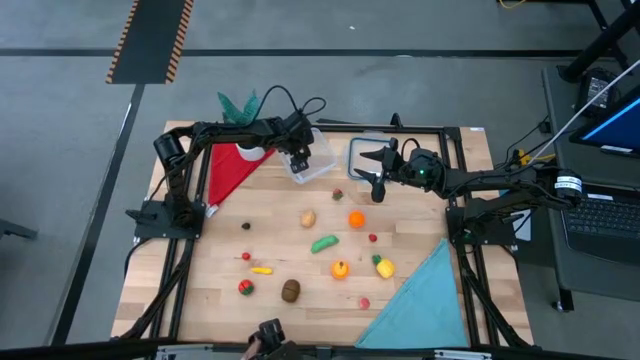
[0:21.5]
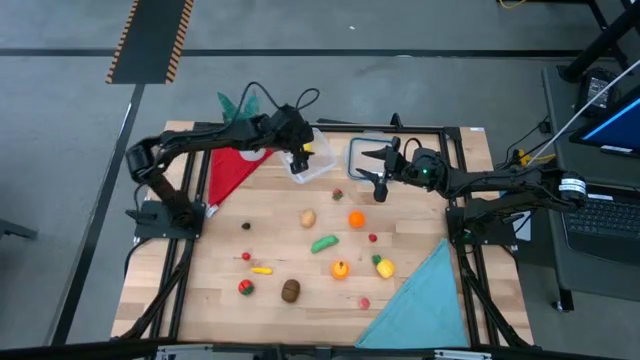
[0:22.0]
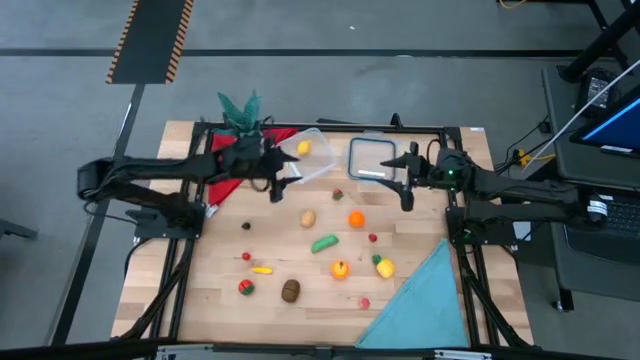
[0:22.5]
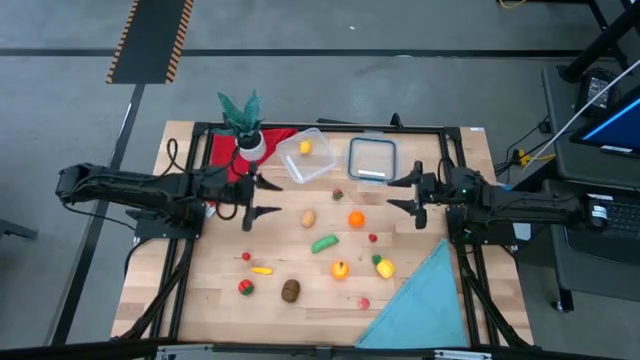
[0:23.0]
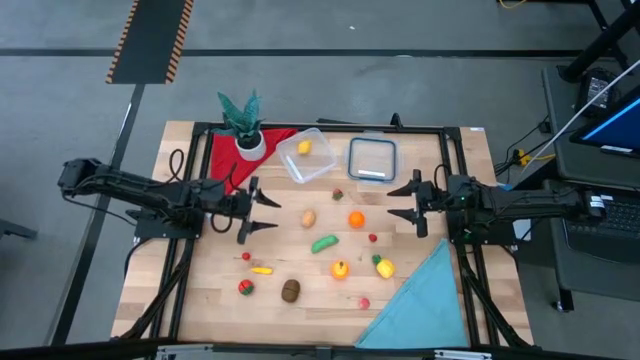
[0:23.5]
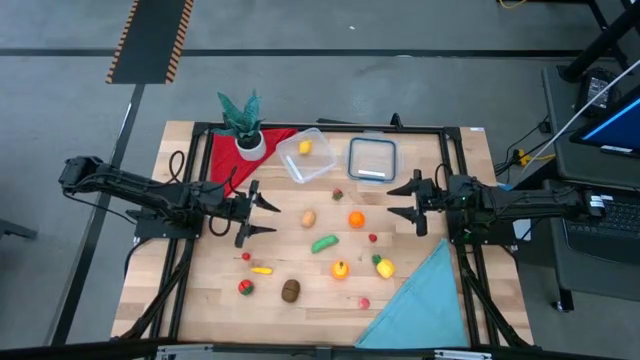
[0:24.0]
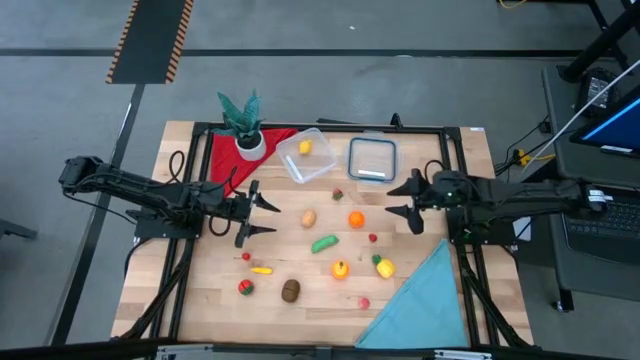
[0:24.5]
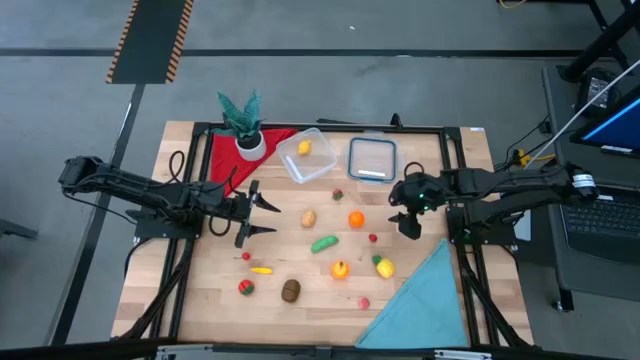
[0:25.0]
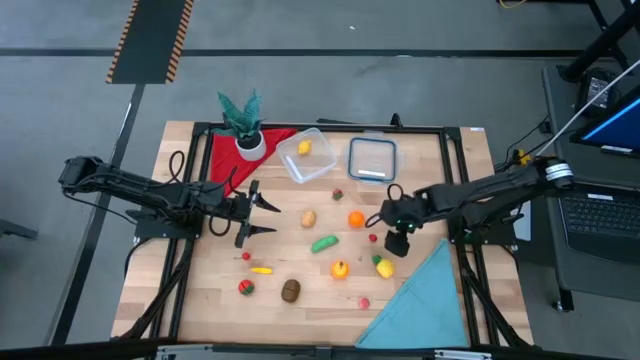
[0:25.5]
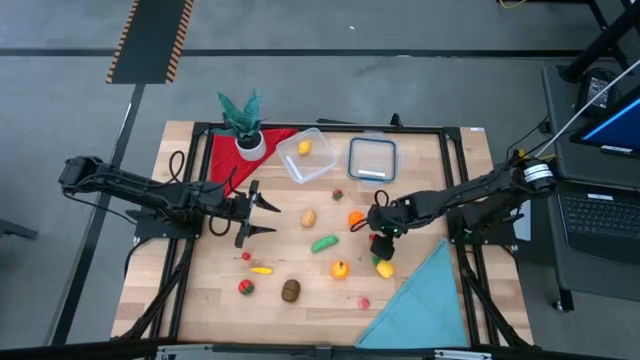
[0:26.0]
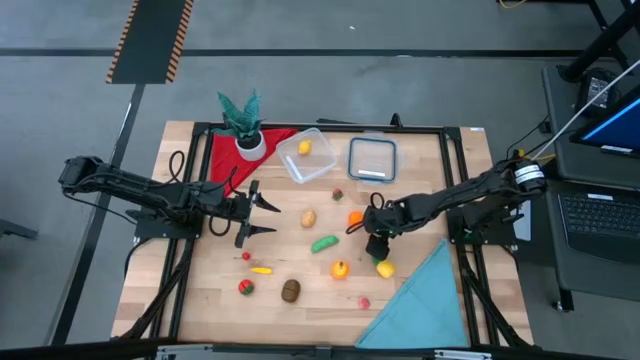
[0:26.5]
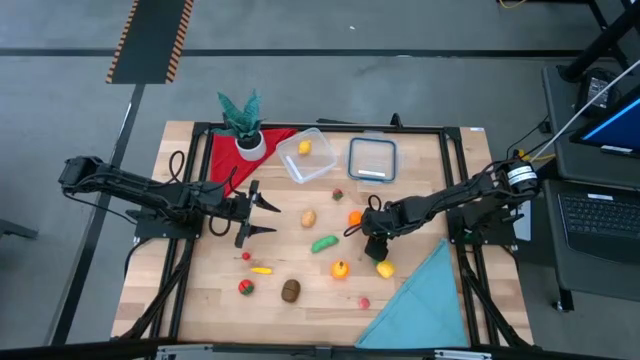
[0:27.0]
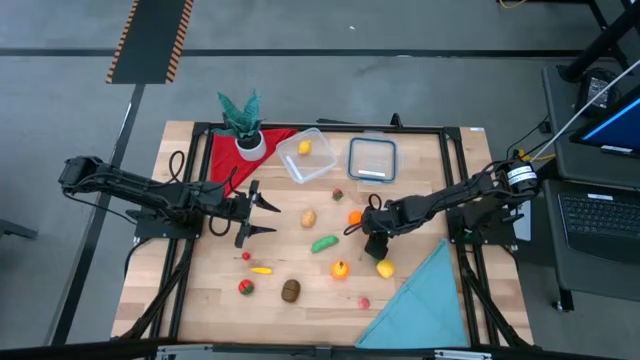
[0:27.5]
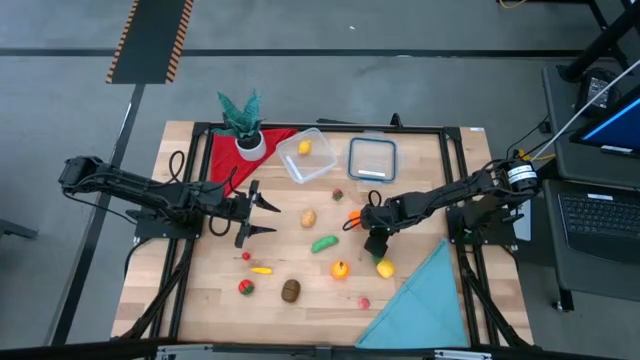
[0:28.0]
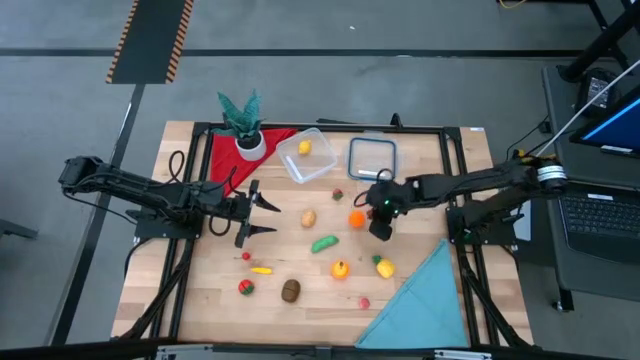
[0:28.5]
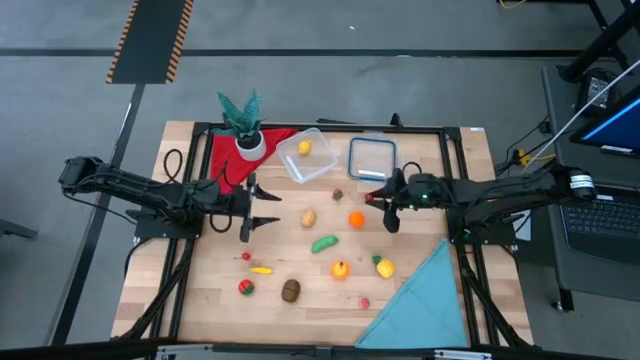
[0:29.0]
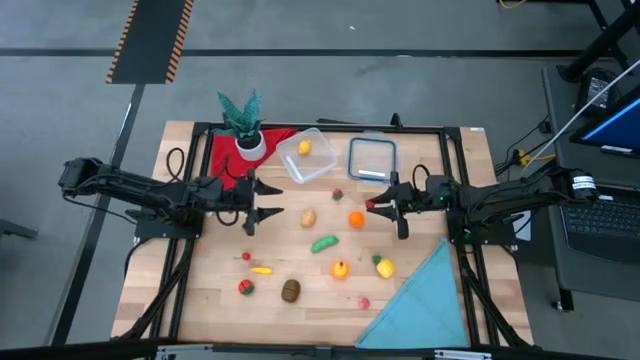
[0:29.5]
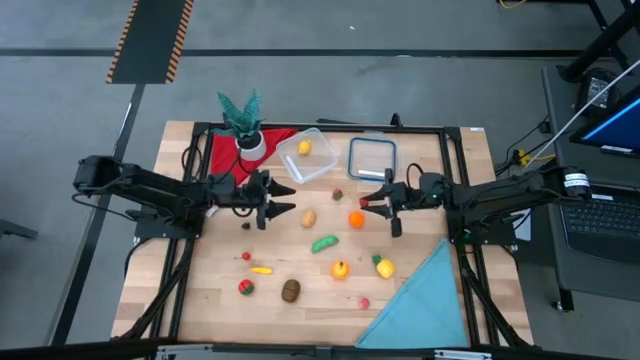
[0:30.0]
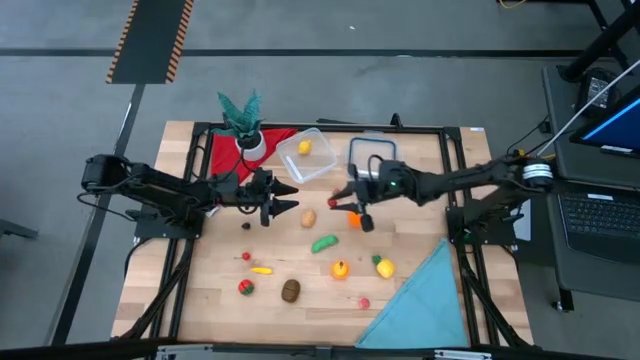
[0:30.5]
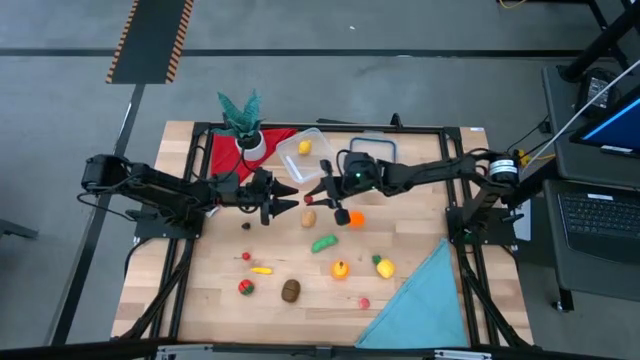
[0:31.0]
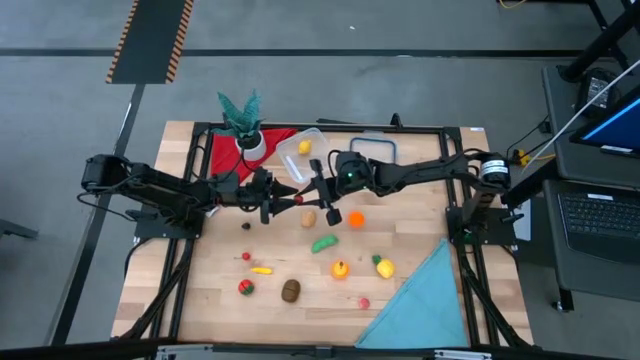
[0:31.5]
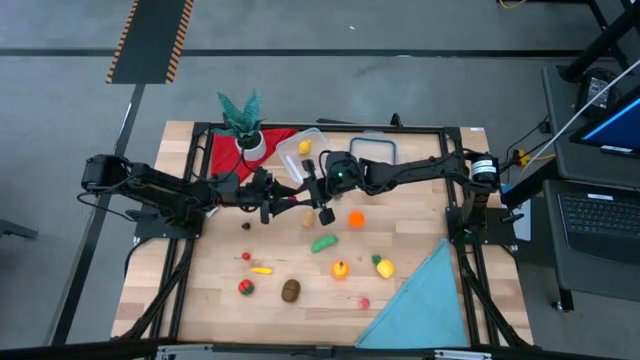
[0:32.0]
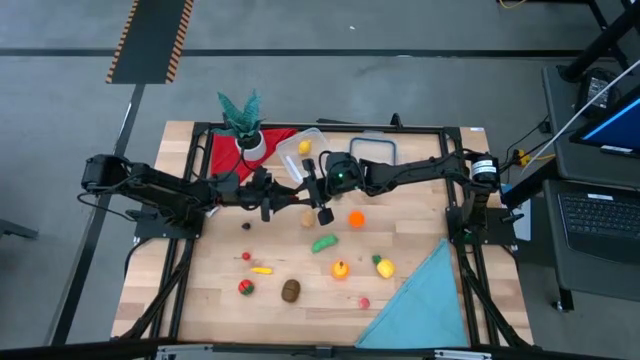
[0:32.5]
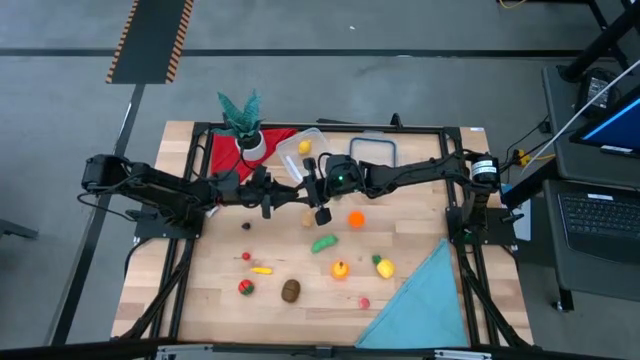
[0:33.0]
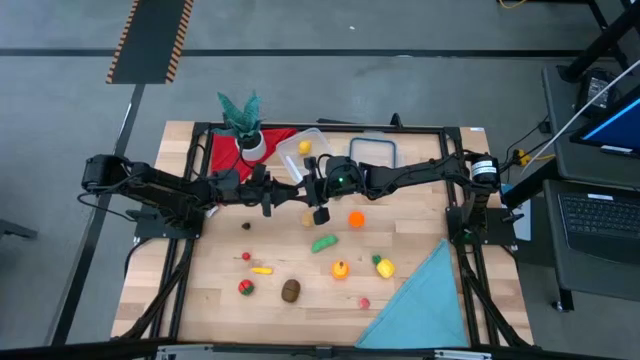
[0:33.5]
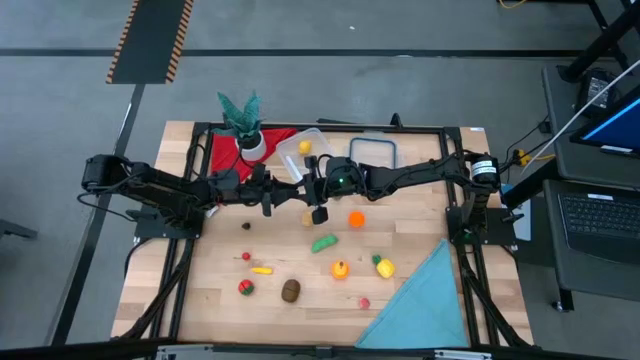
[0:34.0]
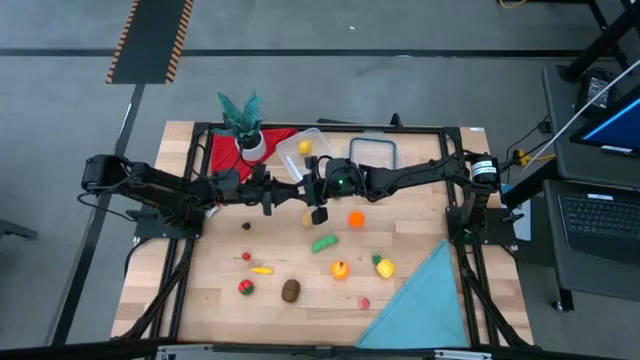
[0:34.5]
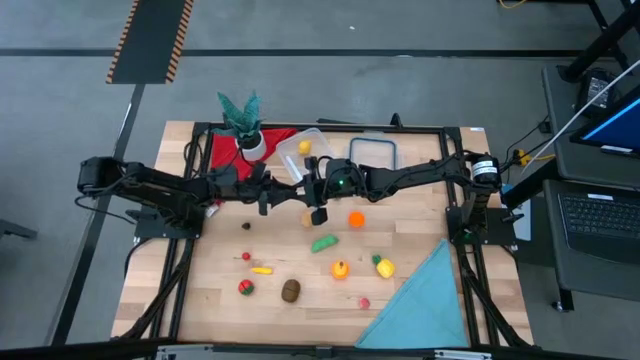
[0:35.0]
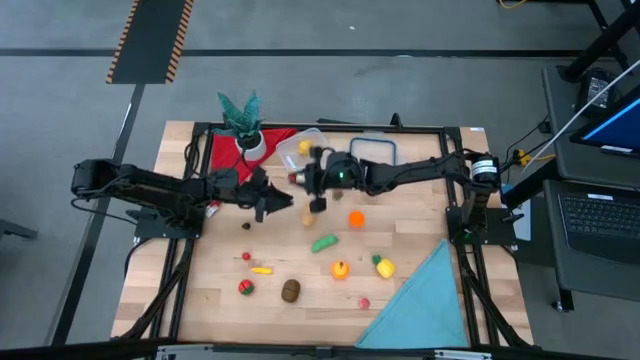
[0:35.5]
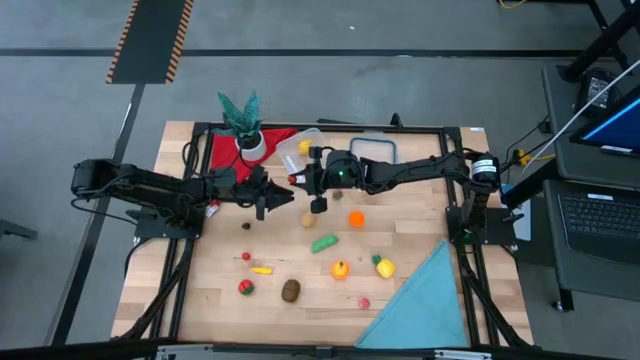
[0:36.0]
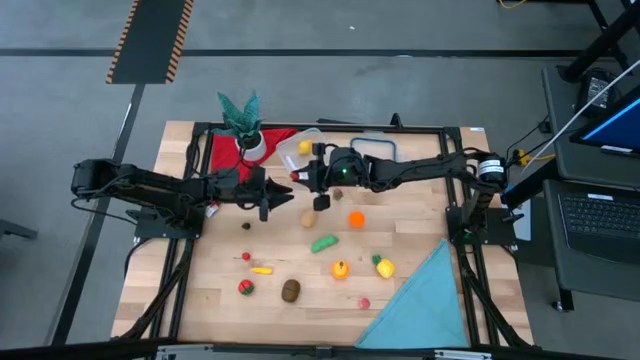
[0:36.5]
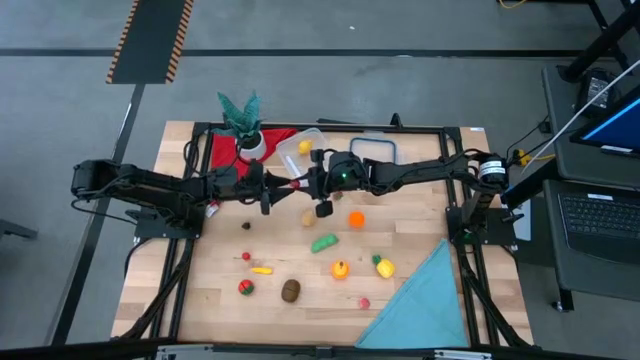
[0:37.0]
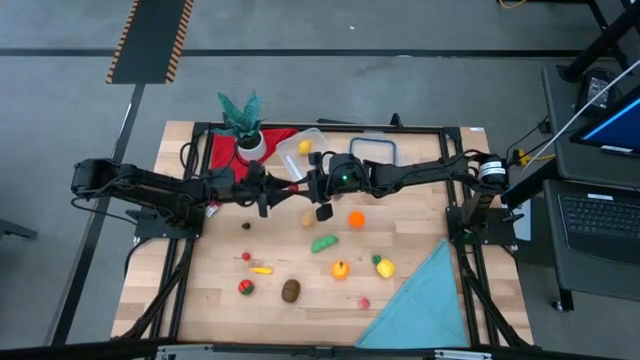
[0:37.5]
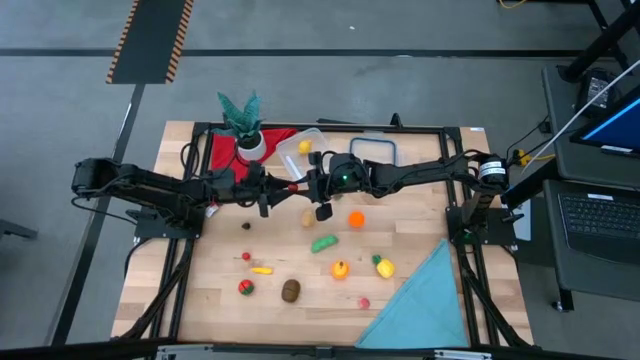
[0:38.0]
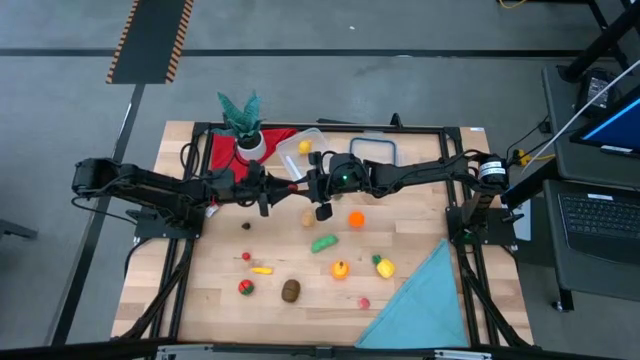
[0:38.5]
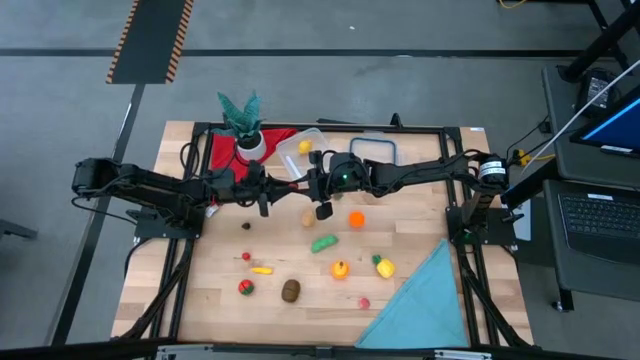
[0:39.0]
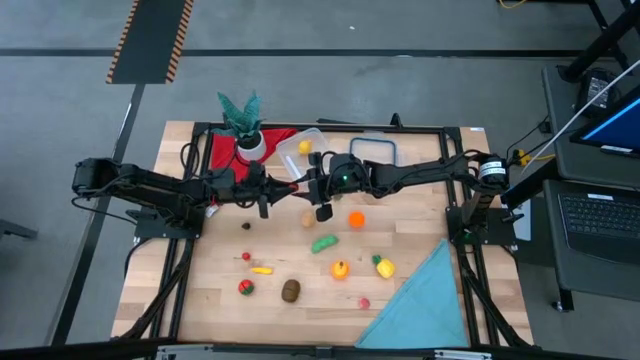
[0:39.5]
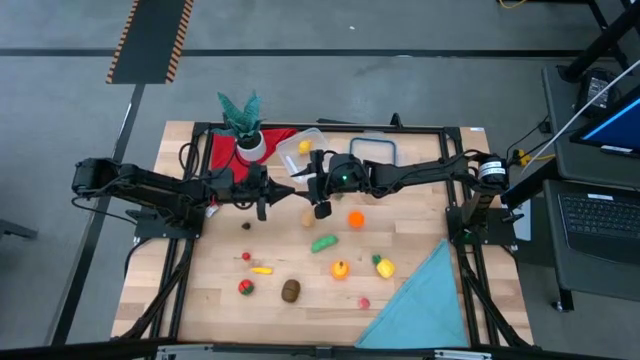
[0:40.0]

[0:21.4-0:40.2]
Task: Pick and placing Produce into tupperware
Put the raspberry into the transparent bin

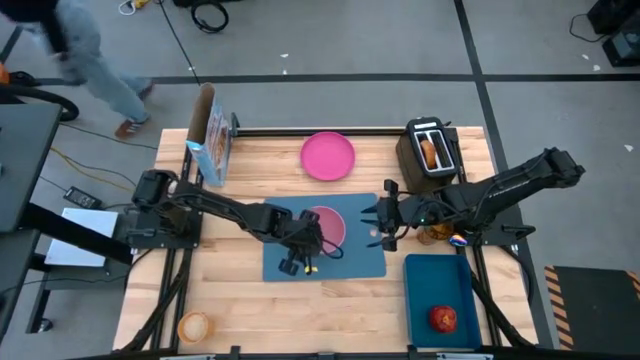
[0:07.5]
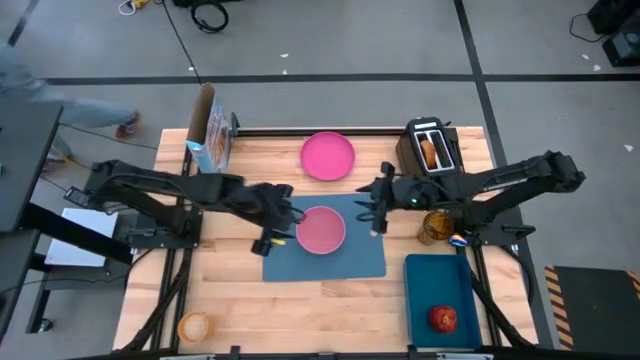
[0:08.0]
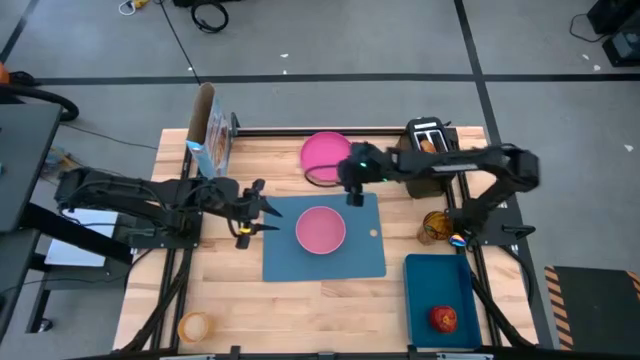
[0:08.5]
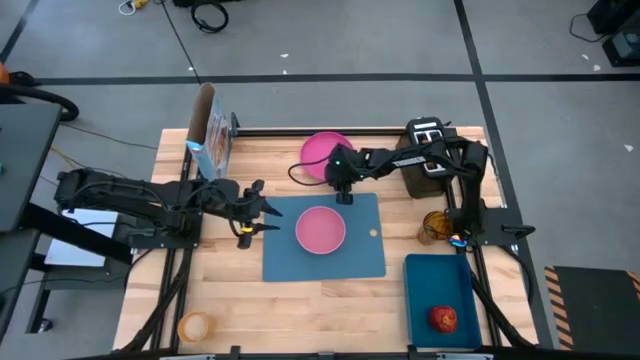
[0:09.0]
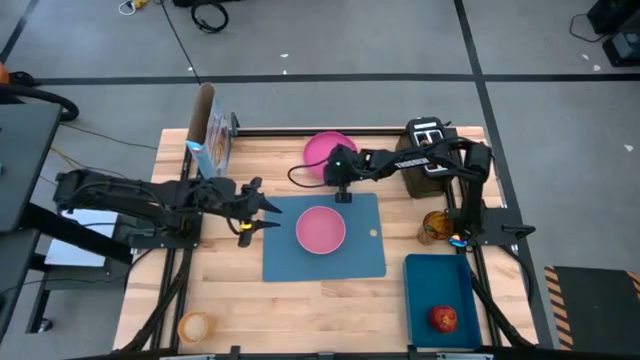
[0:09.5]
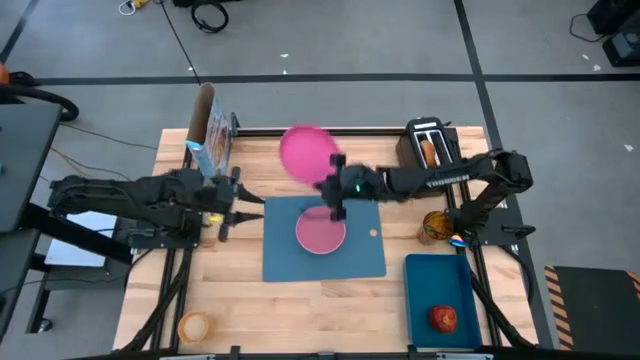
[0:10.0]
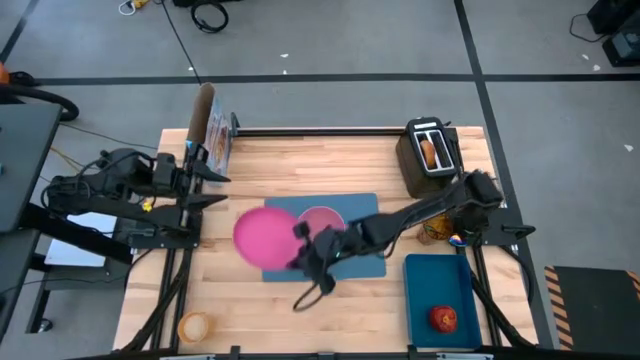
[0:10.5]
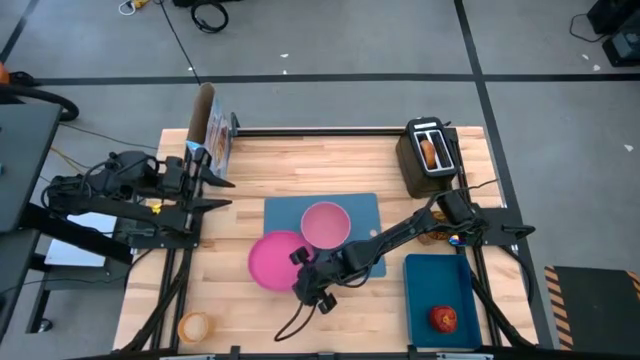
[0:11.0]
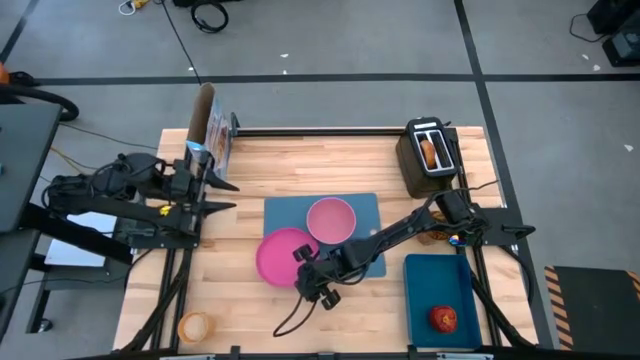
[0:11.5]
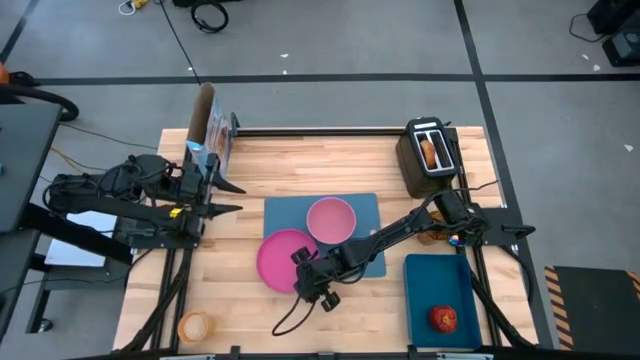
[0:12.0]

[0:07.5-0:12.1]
Task: Arrange a breakfast setting
Put the pink plate on the bottom left of the blue placemat
